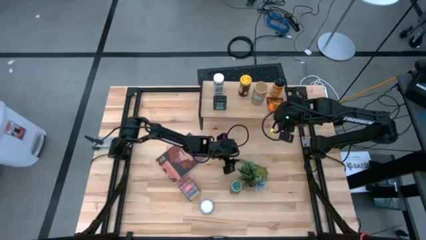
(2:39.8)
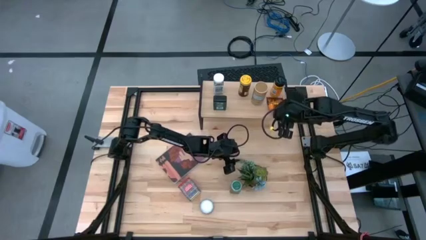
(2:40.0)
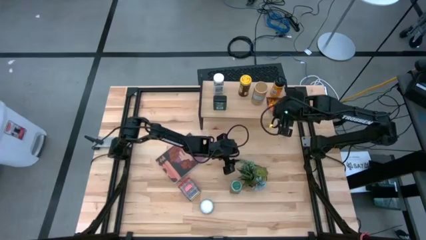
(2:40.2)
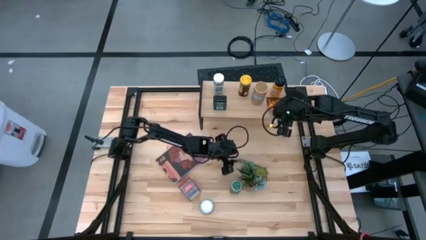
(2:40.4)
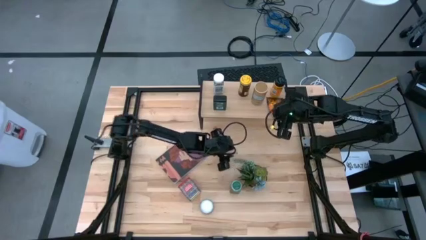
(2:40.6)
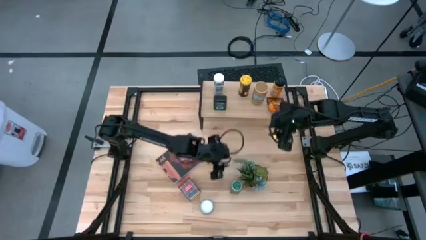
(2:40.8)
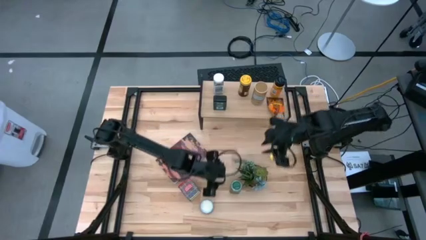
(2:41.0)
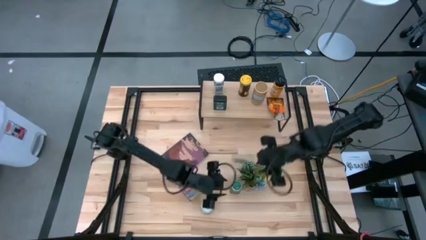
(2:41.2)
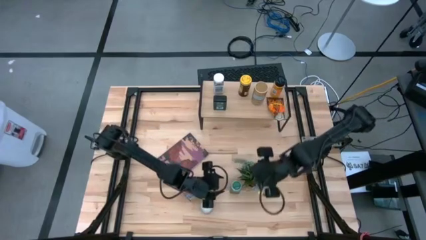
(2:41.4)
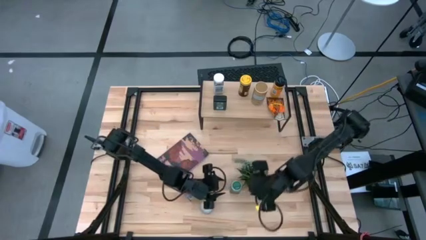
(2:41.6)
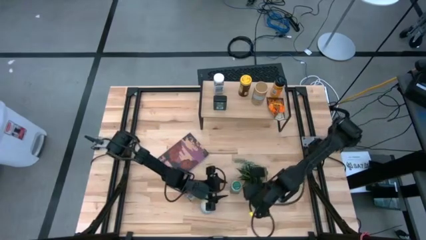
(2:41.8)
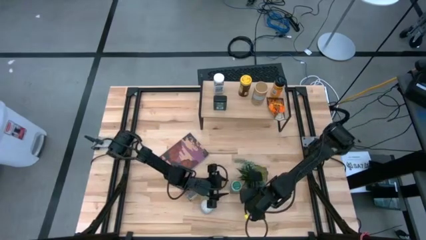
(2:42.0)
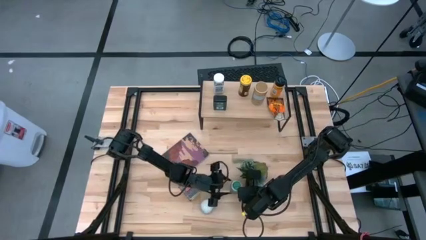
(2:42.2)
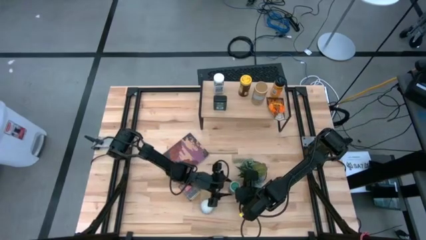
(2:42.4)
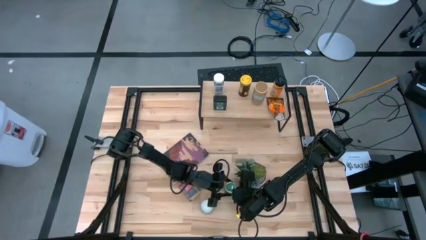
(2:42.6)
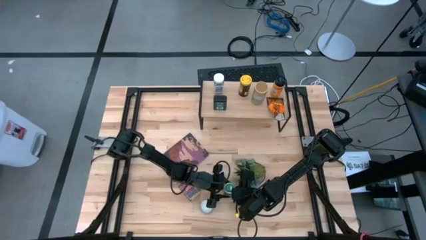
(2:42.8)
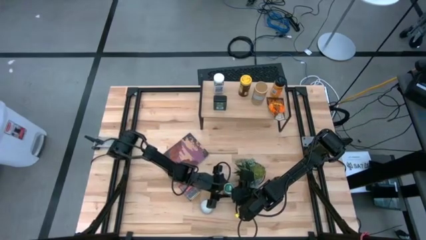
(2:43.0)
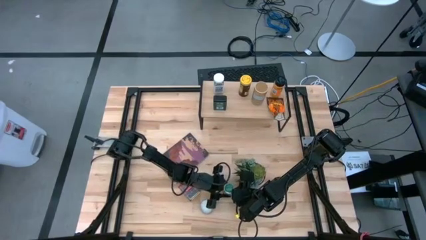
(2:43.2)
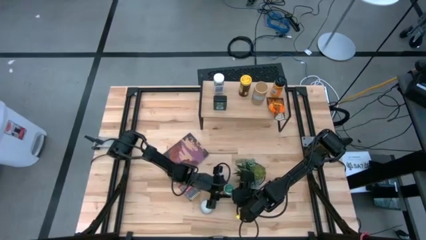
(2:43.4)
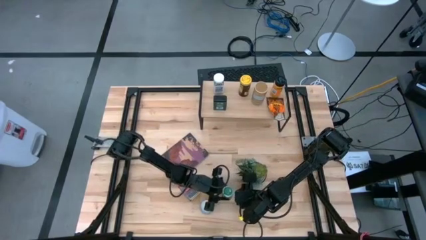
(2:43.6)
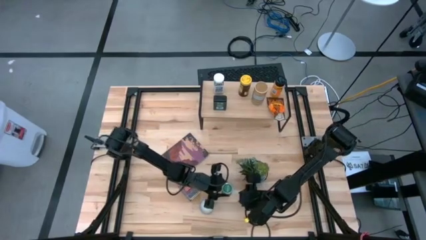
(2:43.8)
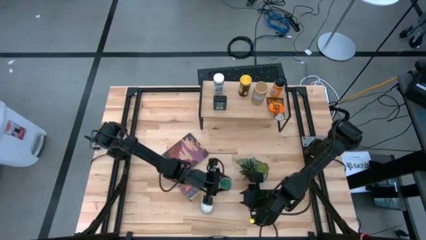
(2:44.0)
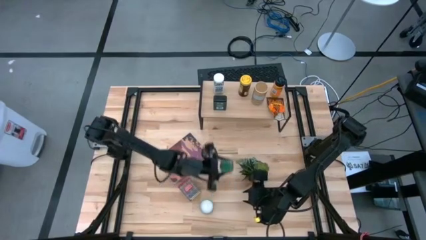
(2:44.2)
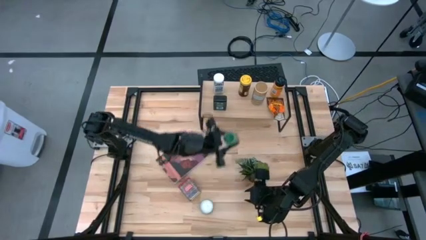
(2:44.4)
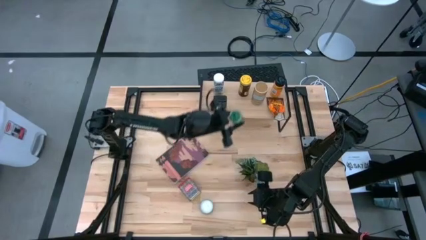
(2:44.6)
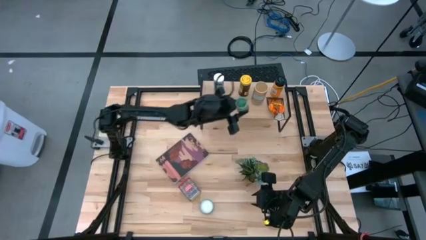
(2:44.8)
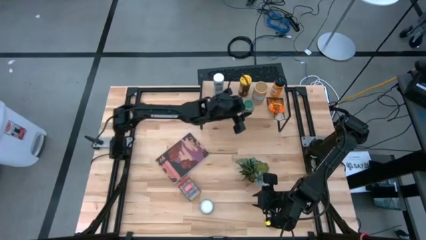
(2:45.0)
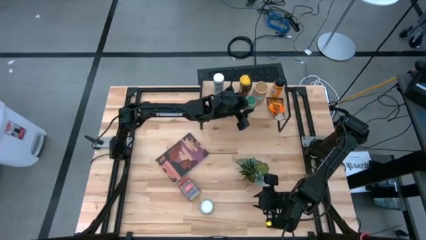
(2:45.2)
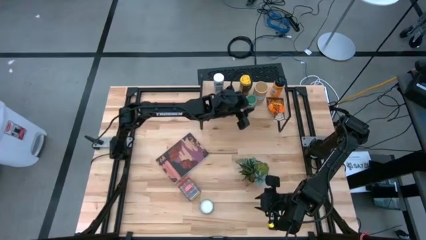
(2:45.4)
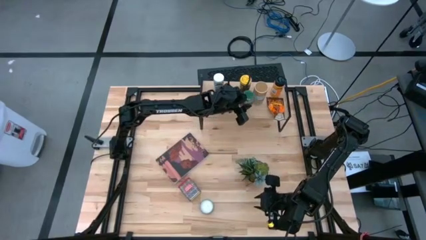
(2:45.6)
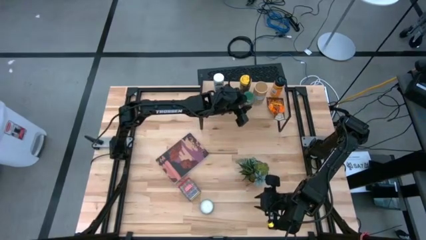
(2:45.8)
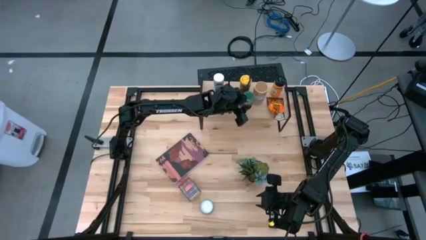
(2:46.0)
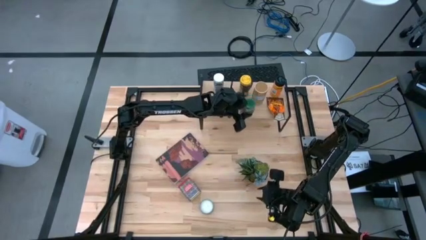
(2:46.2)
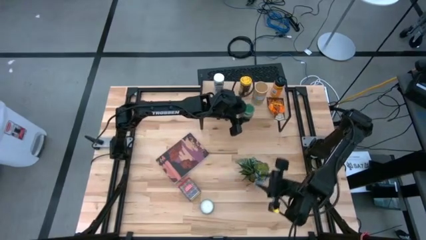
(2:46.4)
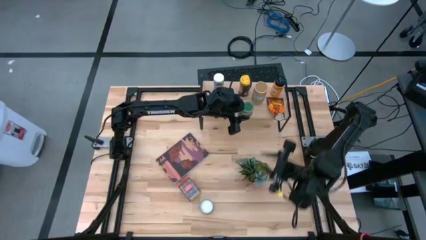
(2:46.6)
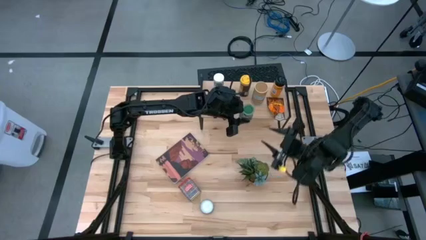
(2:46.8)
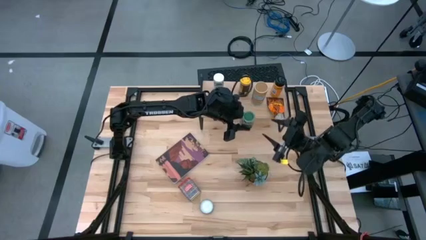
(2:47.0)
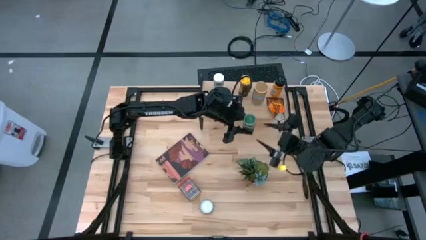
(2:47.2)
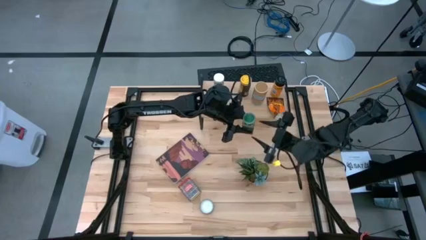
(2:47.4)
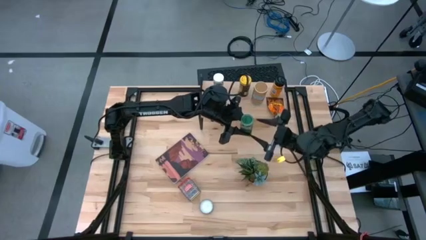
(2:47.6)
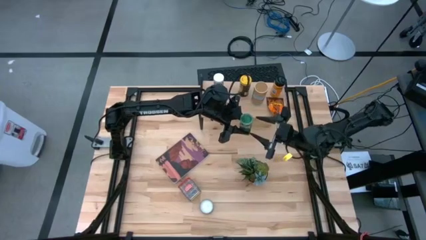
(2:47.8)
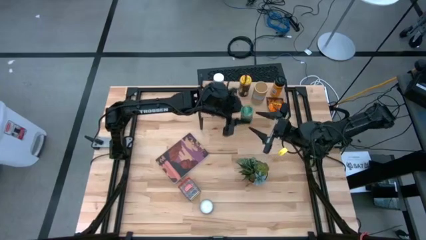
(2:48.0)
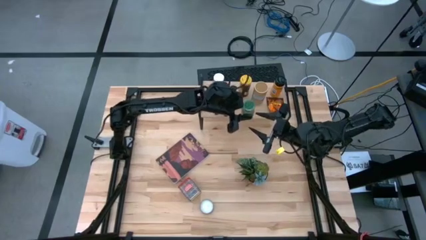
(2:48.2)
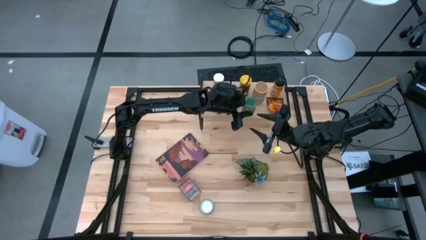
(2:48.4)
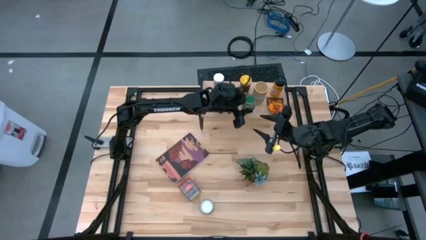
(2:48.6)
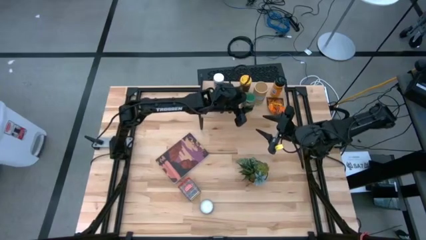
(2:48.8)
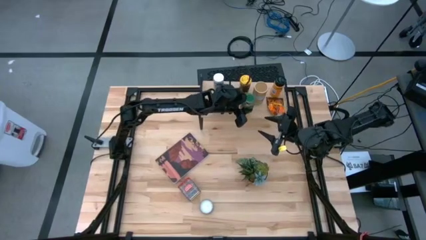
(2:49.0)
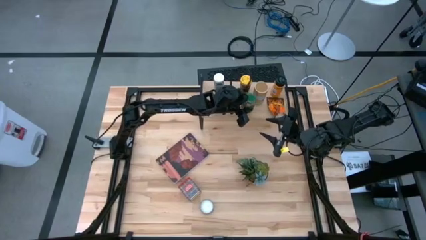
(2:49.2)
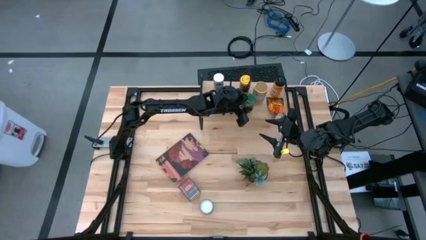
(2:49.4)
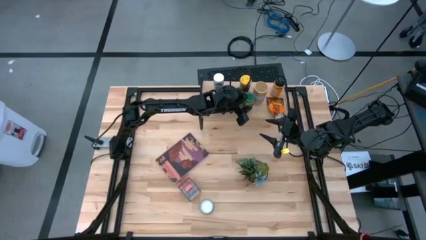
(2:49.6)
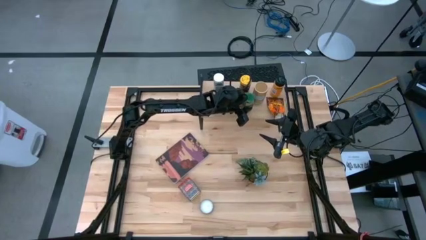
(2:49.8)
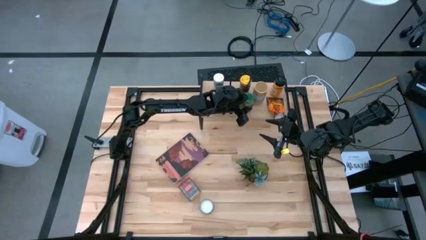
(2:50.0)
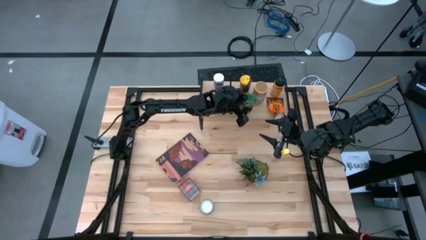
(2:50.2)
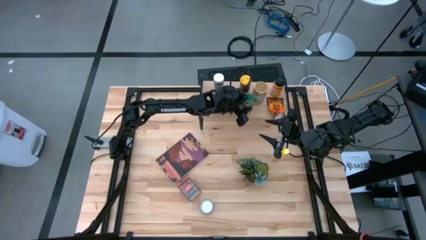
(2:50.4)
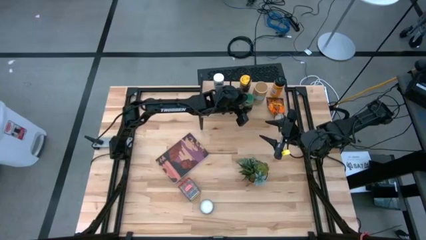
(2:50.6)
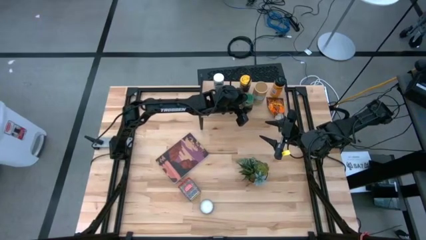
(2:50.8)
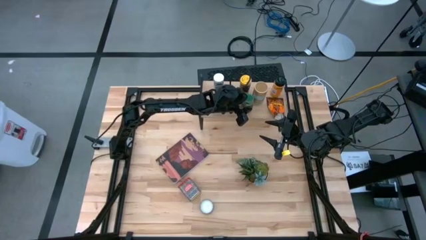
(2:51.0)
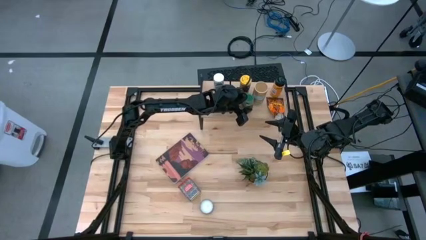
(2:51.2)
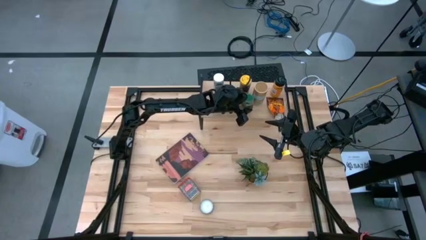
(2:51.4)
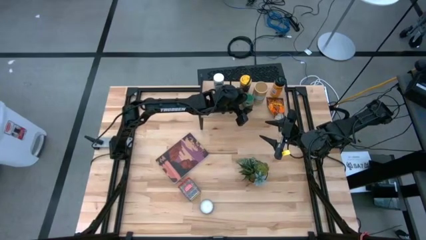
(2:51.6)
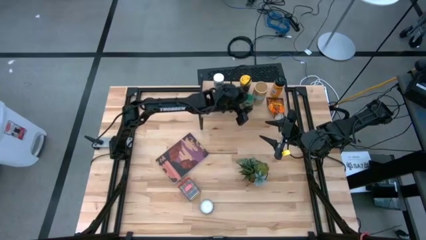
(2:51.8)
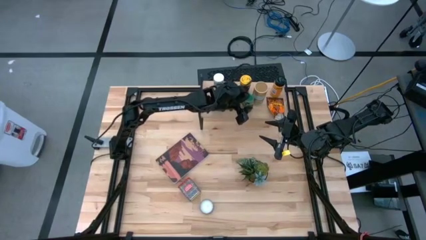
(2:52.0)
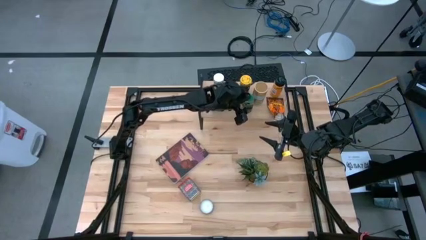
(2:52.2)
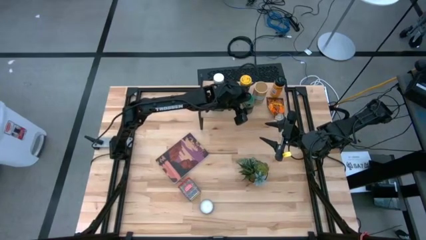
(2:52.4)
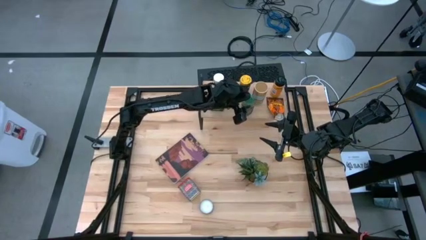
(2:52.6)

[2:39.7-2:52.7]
Task: Shelf spices
Put the green seasoning bottle on the shelf

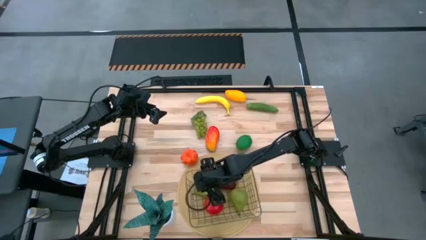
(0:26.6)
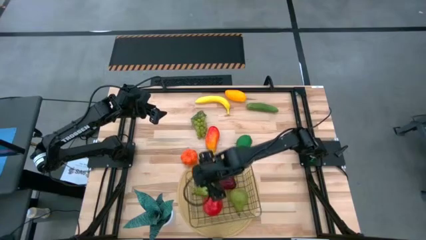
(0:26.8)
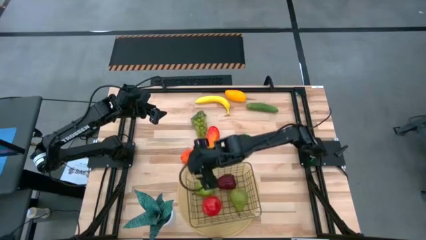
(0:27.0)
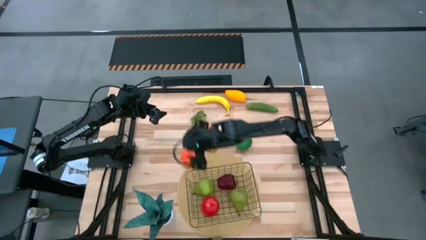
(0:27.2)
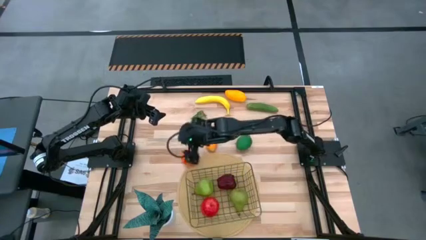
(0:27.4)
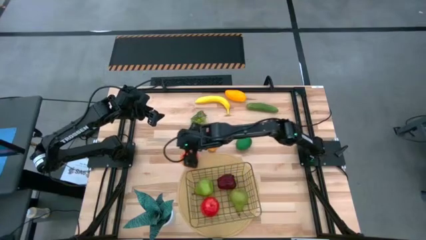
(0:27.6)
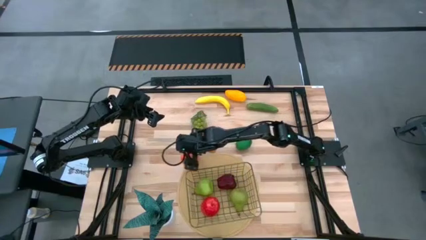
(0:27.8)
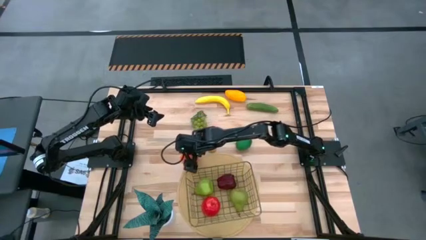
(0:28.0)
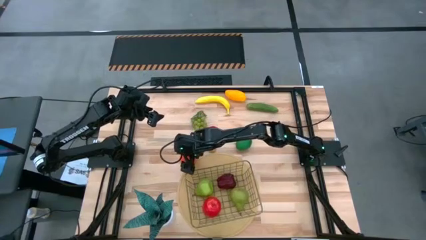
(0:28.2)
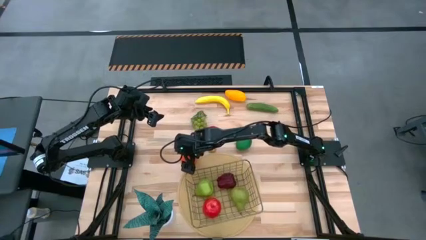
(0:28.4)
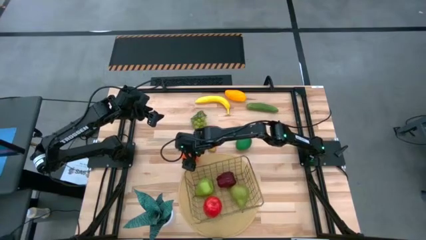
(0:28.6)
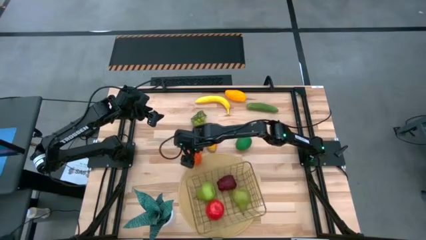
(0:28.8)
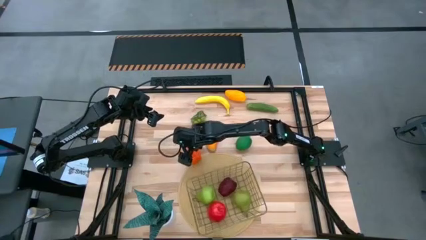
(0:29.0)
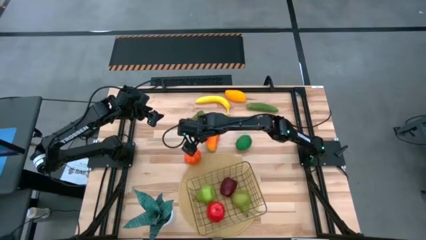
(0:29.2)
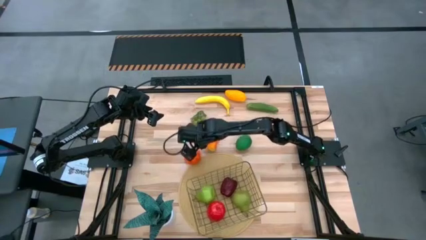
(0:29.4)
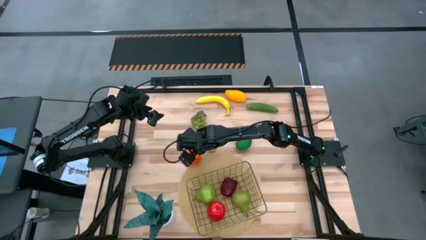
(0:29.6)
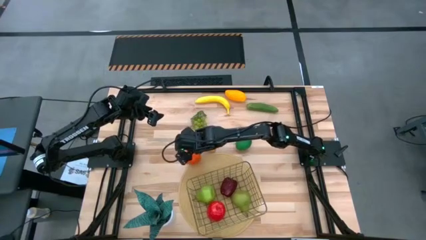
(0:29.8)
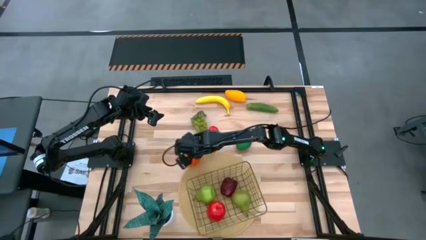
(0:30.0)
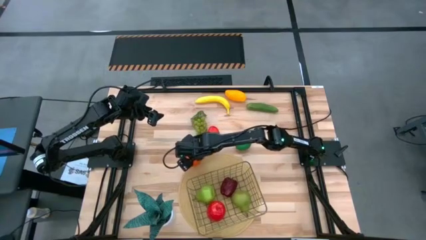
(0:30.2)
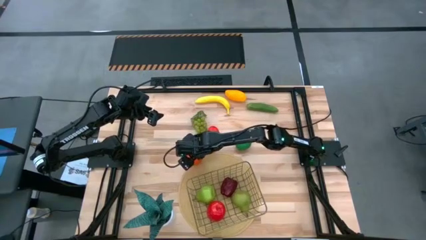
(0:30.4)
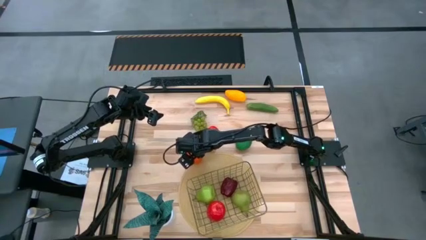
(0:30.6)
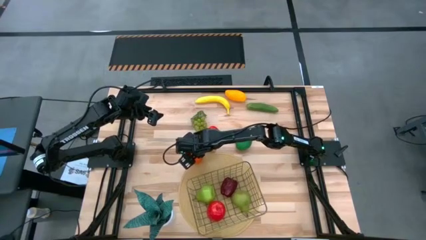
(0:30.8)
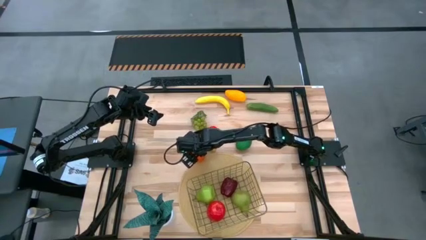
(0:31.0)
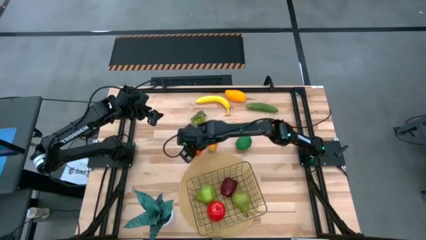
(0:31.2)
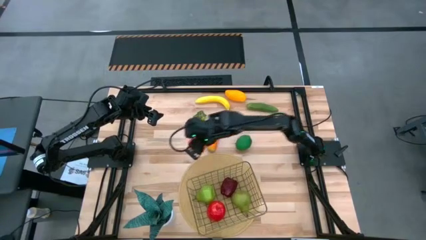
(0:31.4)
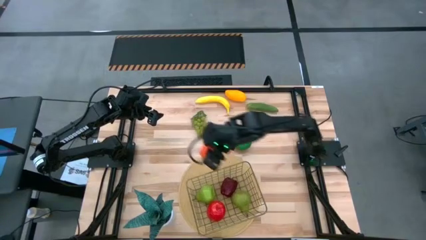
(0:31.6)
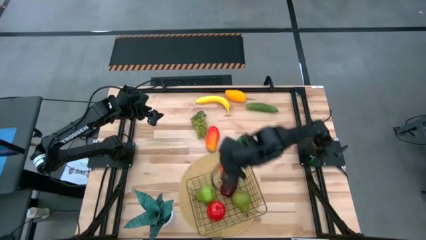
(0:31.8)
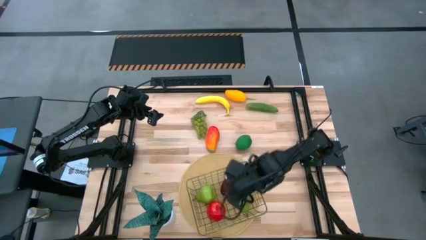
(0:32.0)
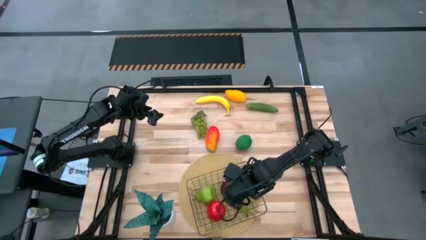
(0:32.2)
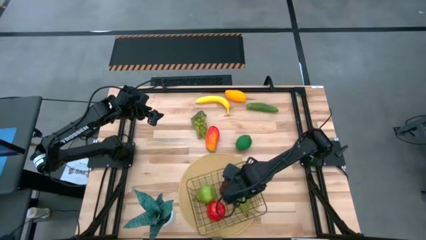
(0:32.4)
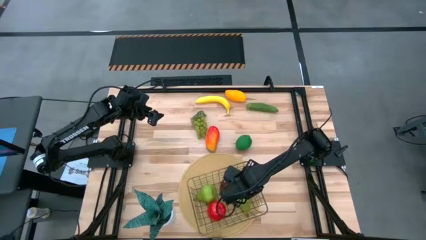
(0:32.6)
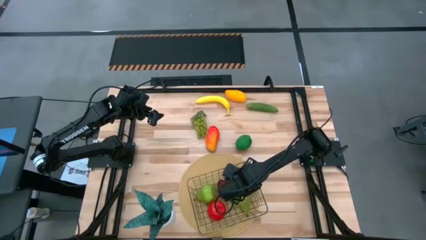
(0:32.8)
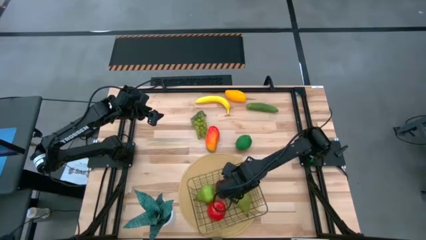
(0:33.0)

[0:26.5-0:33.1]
Task: Build produce basket
Put the pumpkin into the wire basket
